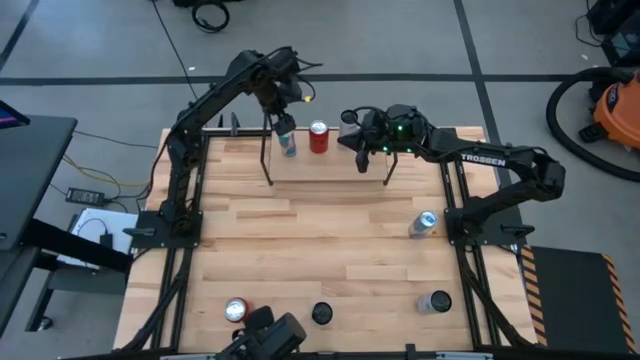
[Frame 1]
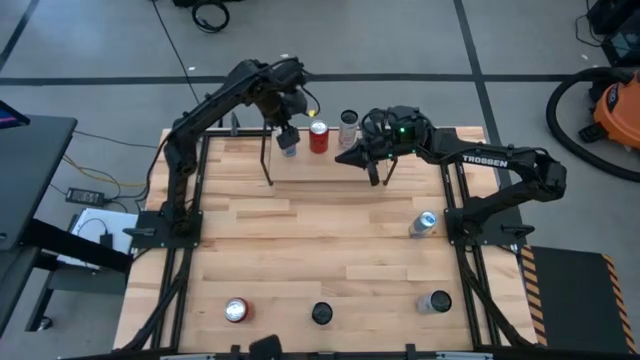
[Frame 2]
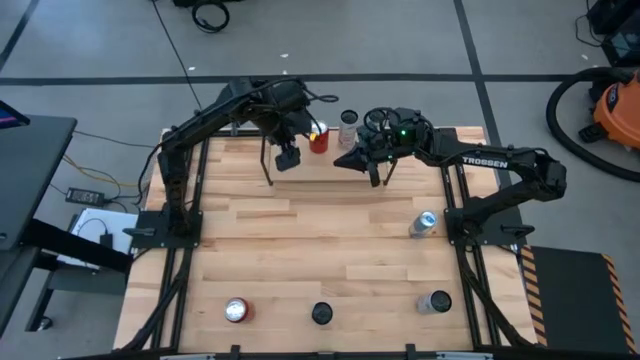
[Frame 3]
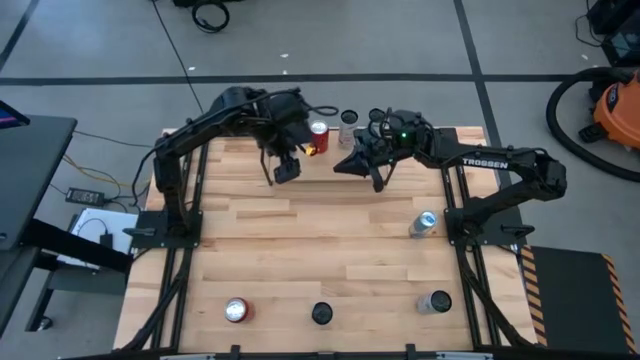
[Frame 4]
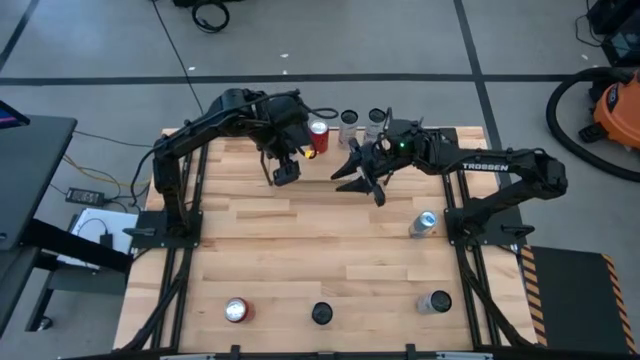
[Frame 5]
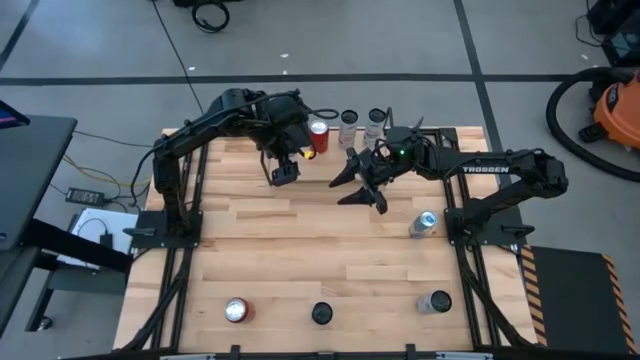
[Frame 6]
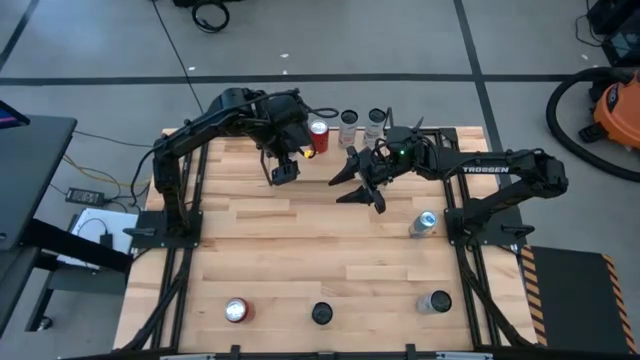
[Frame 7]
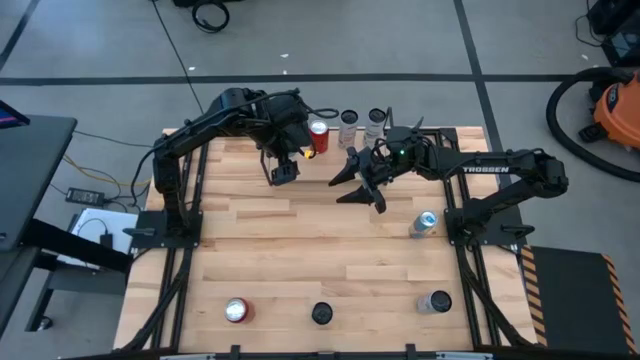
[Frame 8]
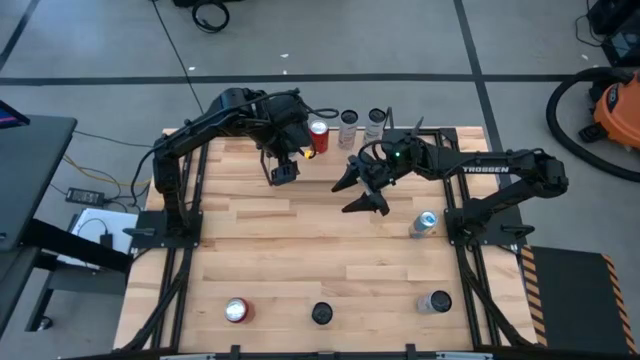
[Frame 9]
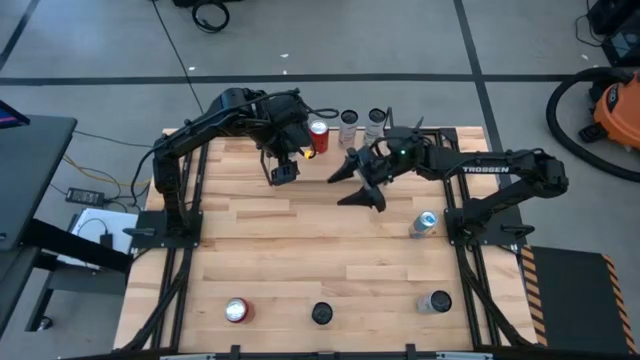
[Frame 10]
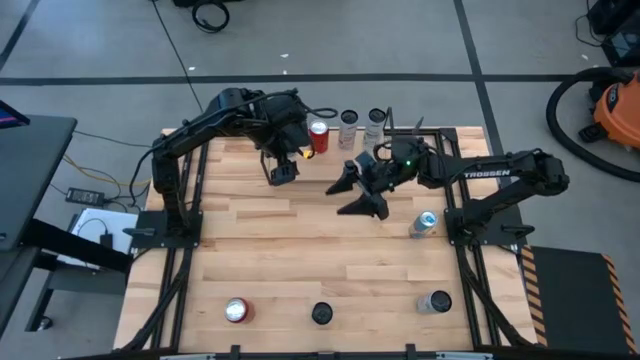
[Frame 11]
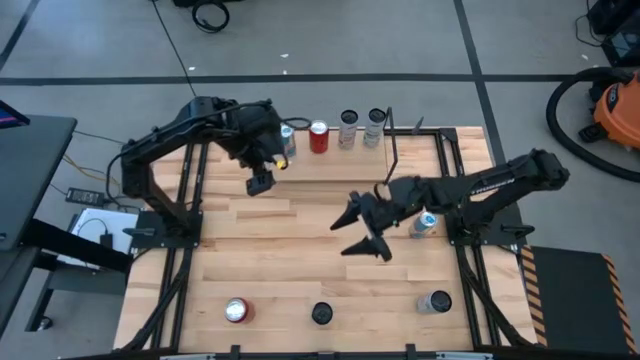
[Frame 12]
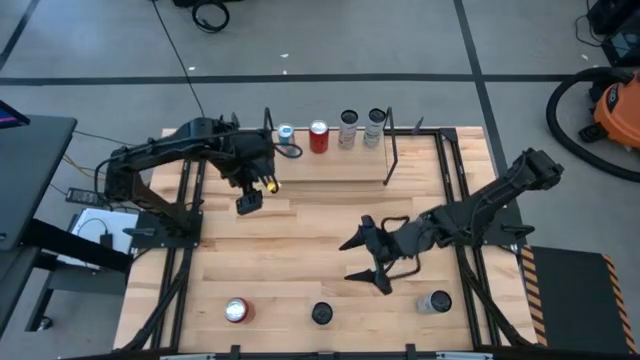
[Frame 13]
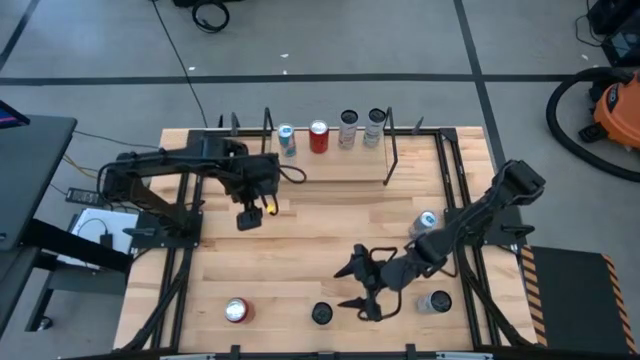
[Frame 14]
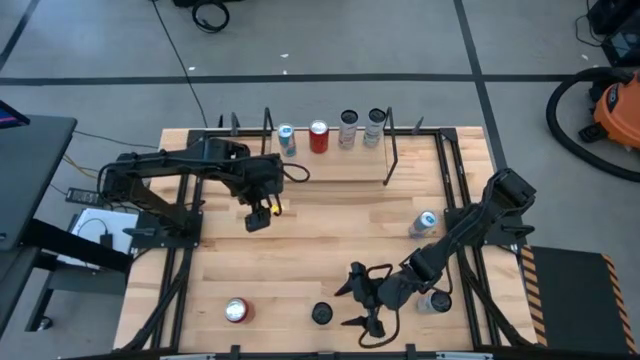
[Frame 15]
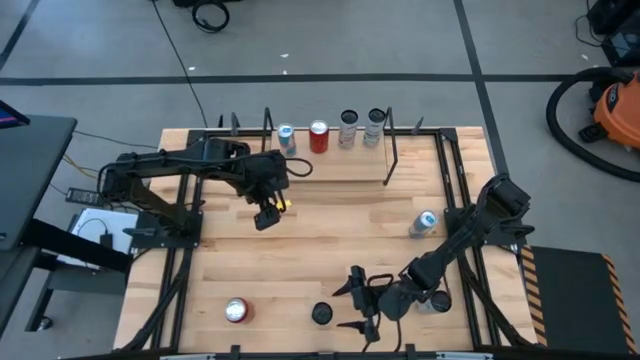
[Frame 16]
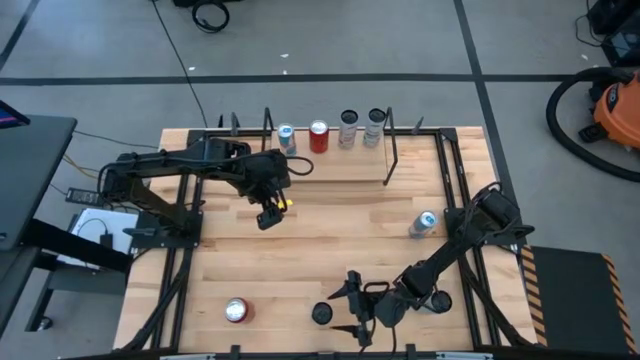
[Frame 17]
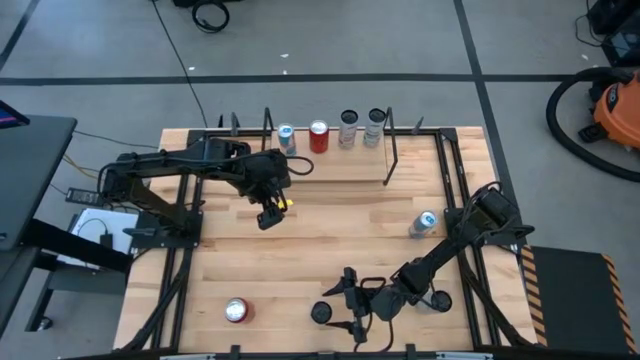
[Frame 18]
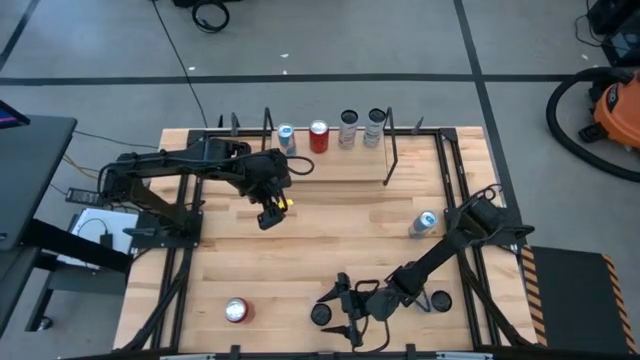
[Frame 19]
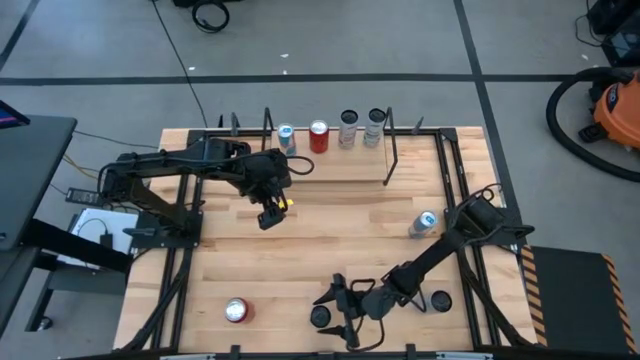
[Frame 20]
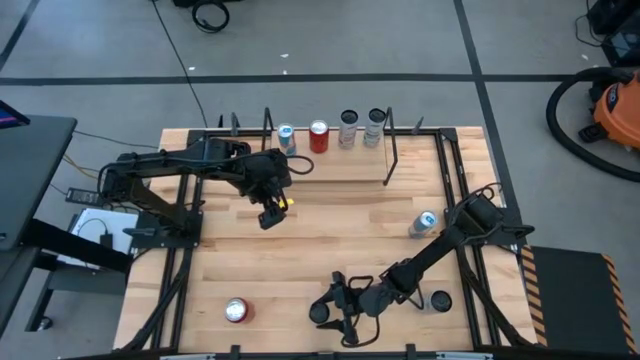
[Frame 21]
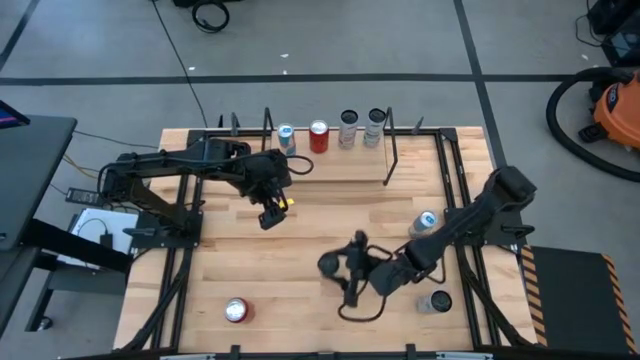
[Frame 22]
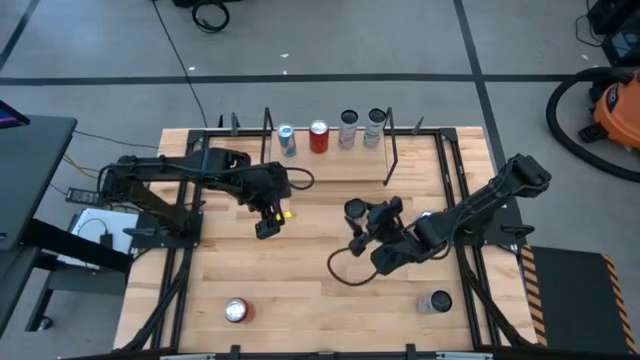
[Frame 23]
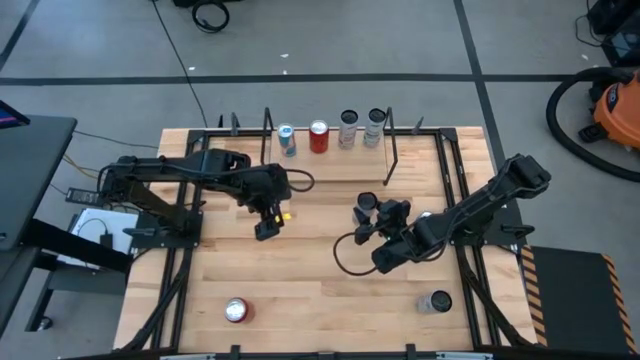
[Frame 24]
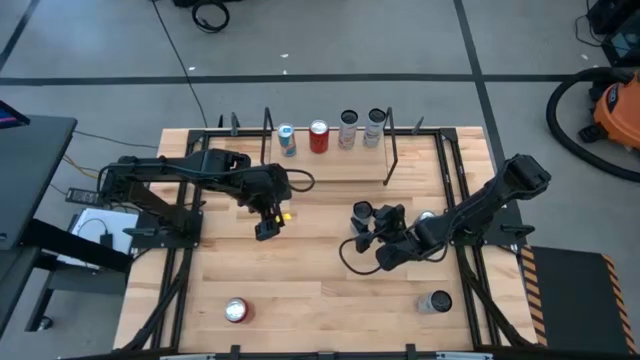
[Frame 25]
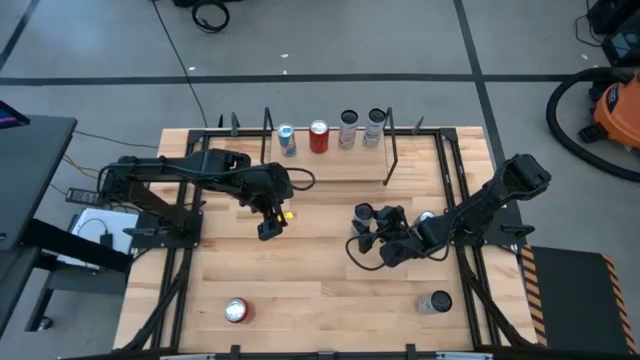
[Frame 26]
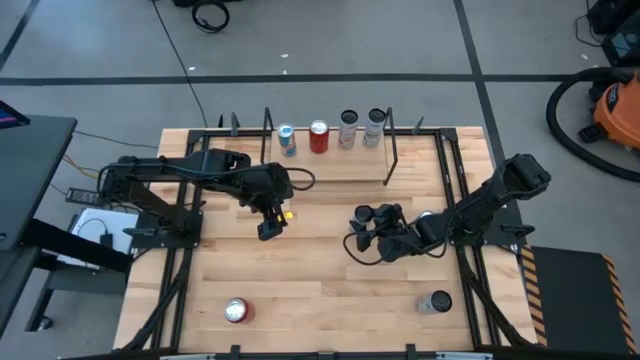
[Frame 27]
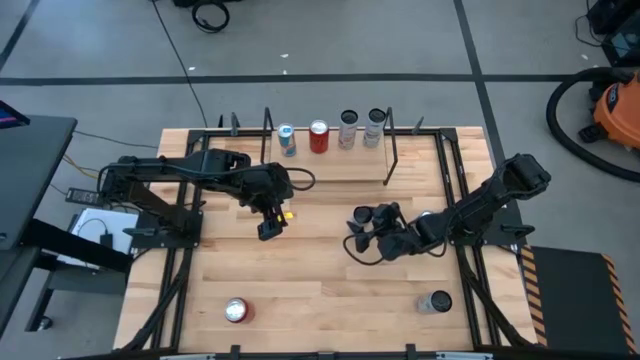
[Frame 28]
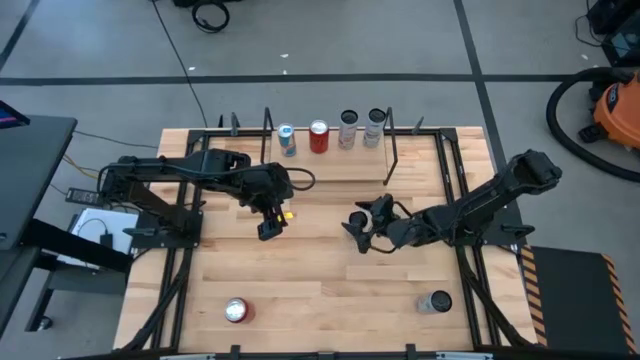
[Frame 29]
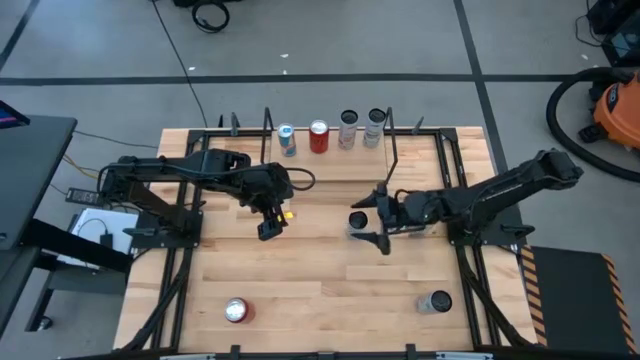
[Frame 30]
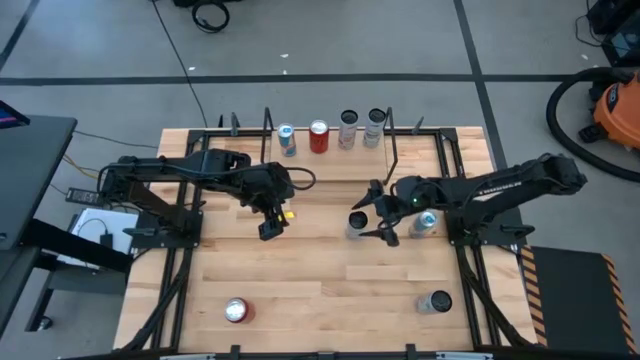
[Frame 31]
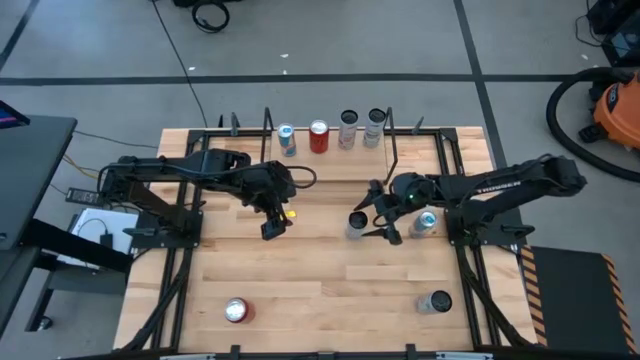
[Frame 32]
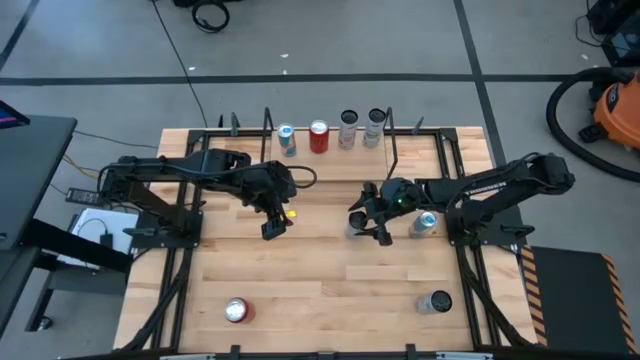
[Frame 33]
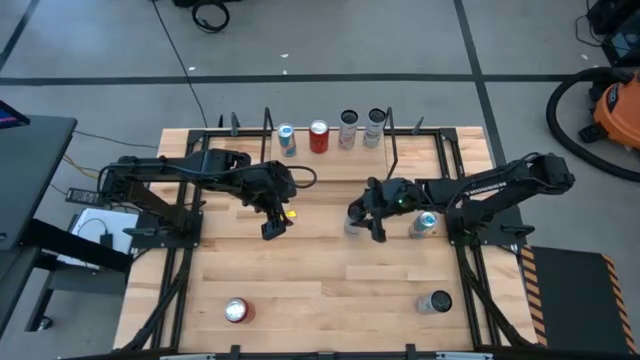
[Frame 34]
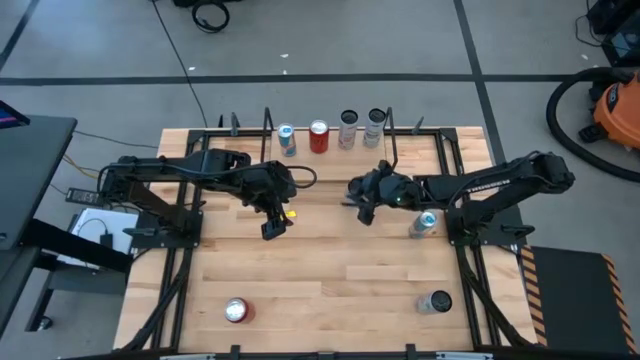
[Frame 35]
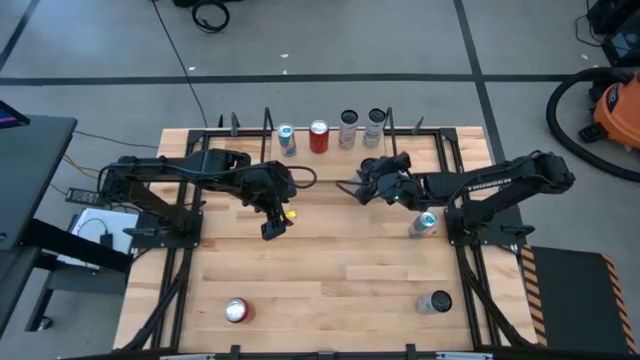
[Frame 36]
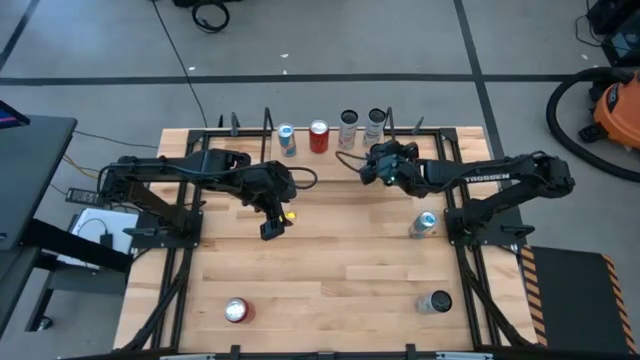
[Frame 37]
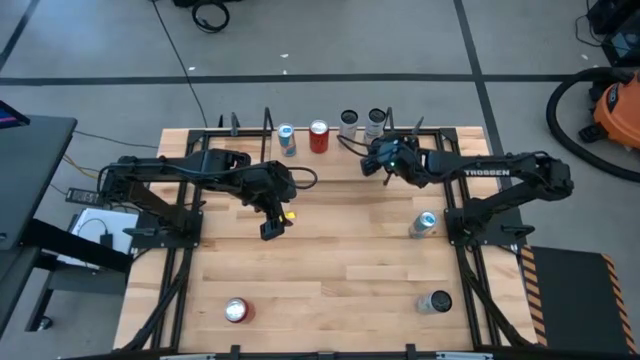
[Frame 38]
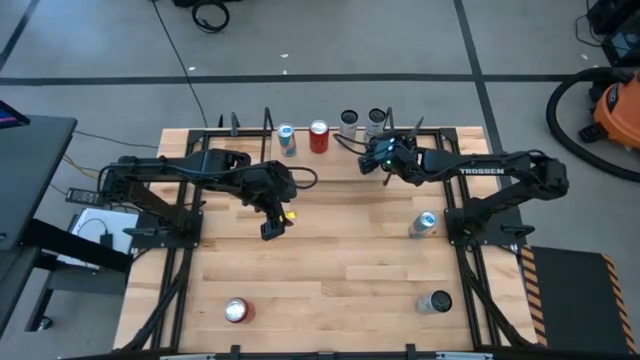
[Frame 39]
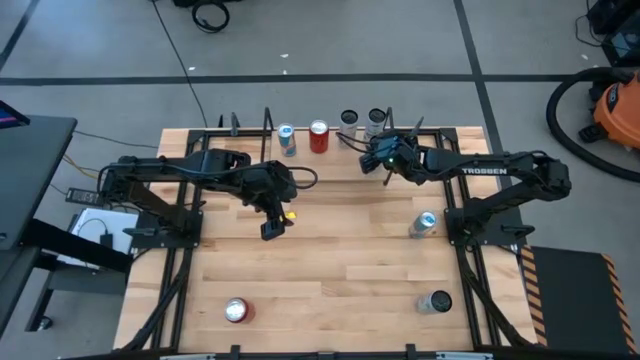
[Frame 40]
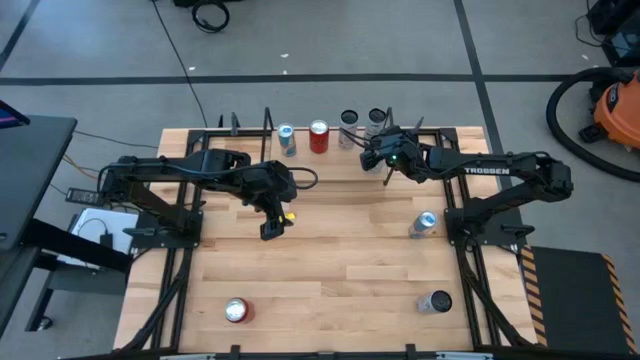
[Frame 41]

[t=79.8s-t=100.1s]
Task: Place canned beverage on shelf
Put the white-blue soda can on the shelf aligned with the other white-blue soda can

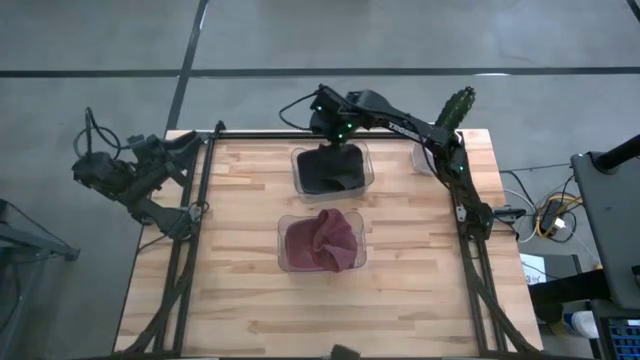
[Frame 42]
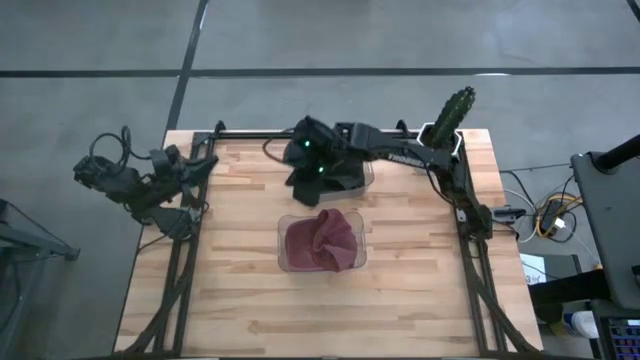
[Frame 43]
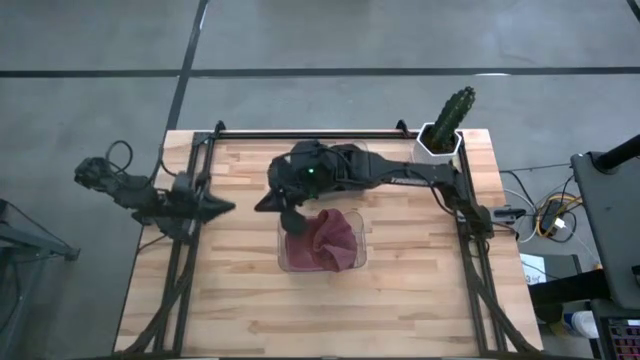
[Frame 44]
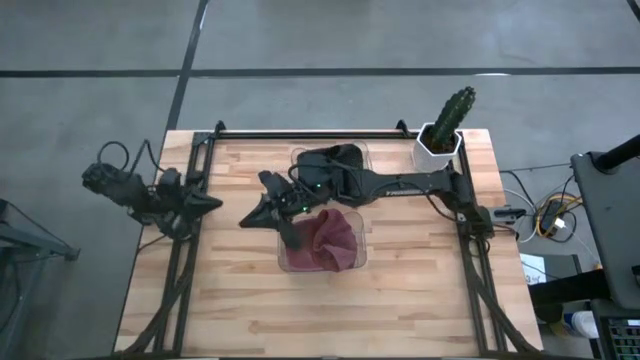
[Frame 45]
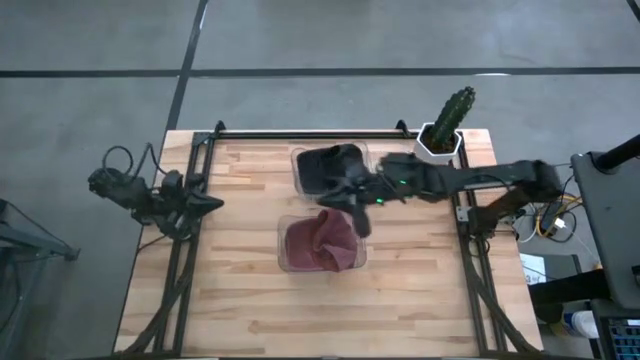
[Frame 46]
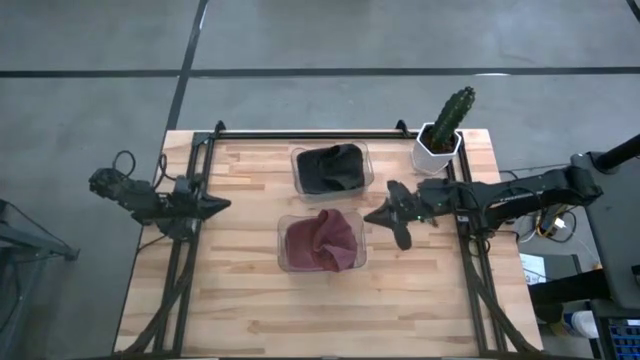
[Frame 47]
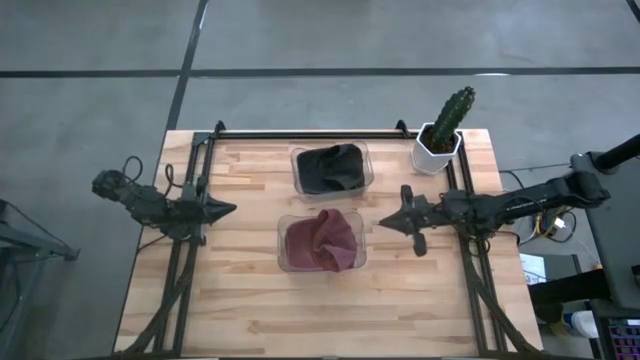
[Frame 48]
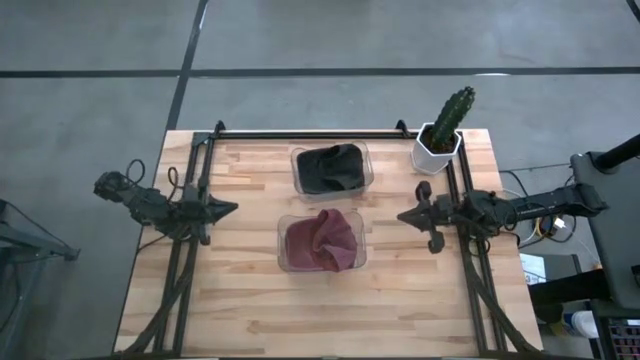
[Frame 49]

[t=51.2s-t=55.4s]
Task: Pick & Place hat
Return to Home Position
